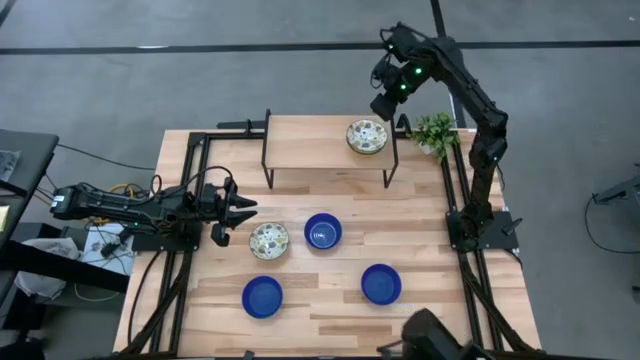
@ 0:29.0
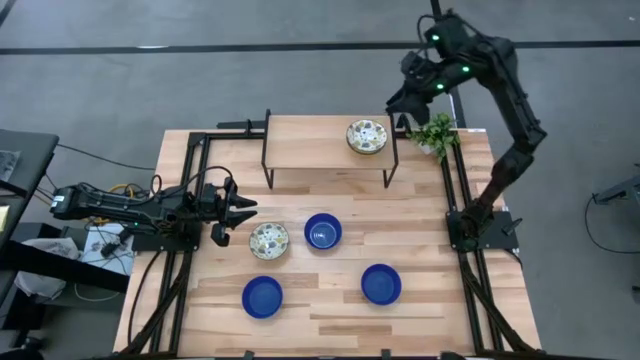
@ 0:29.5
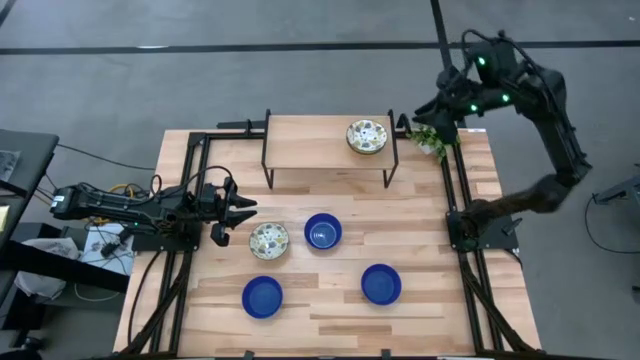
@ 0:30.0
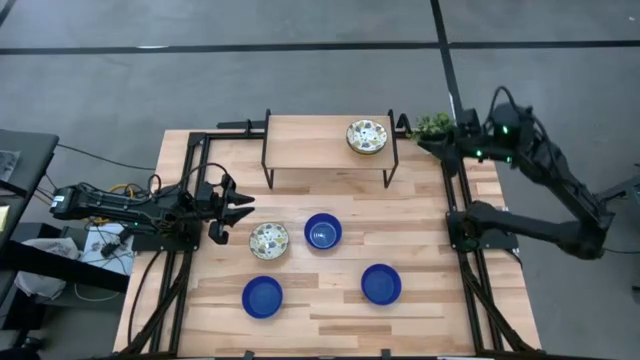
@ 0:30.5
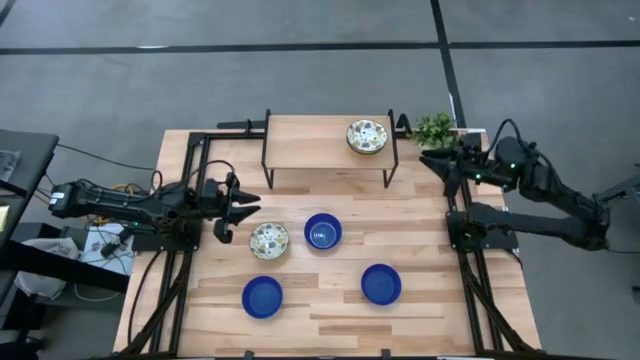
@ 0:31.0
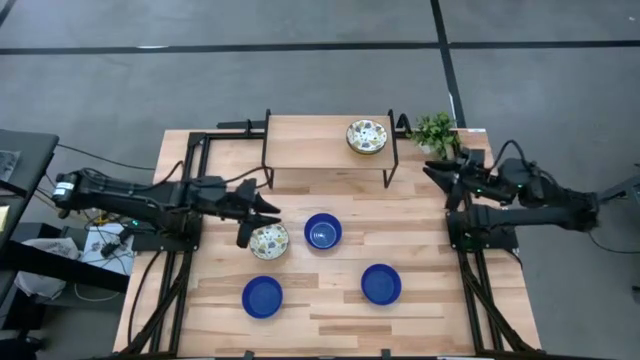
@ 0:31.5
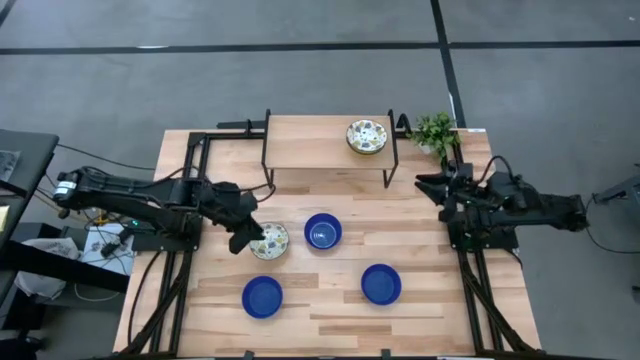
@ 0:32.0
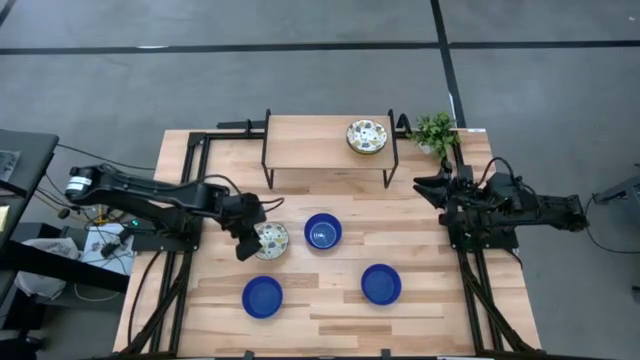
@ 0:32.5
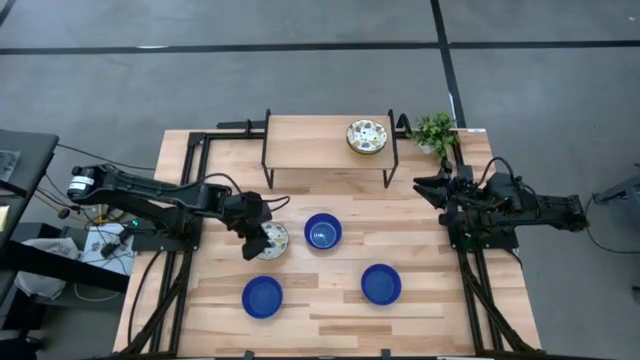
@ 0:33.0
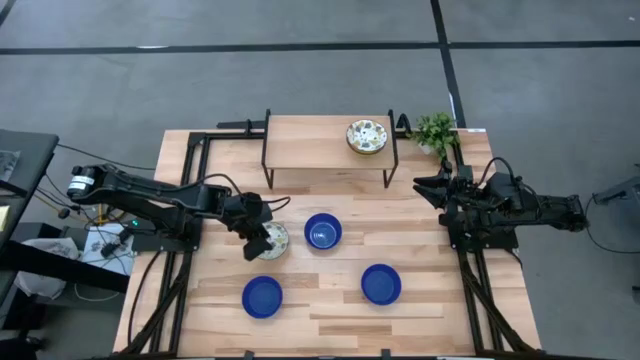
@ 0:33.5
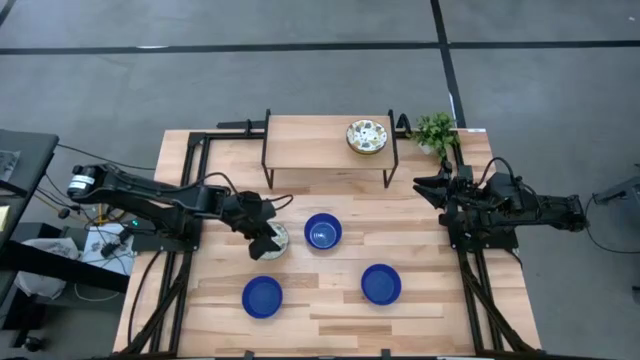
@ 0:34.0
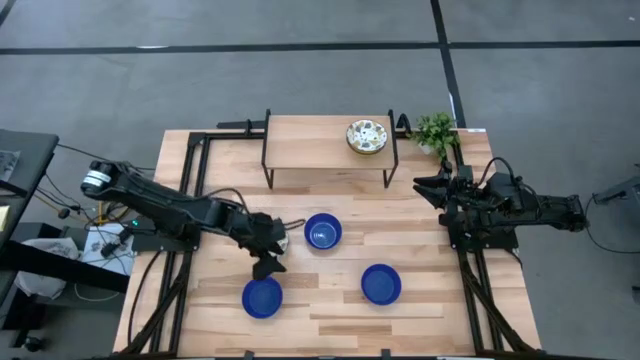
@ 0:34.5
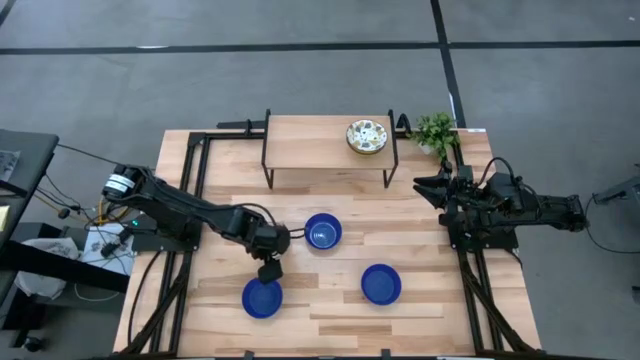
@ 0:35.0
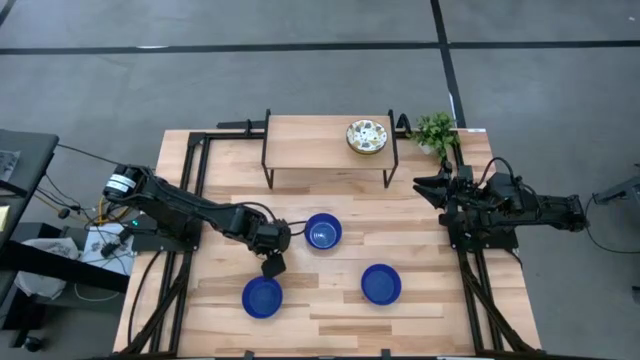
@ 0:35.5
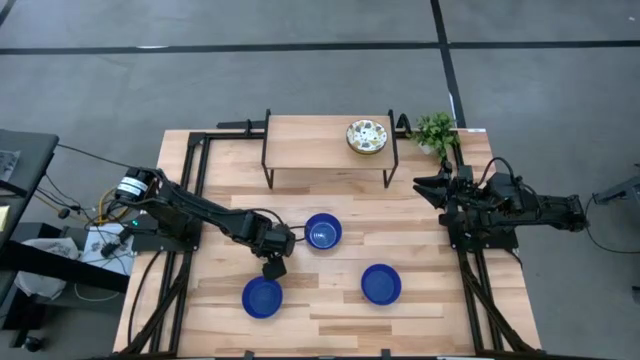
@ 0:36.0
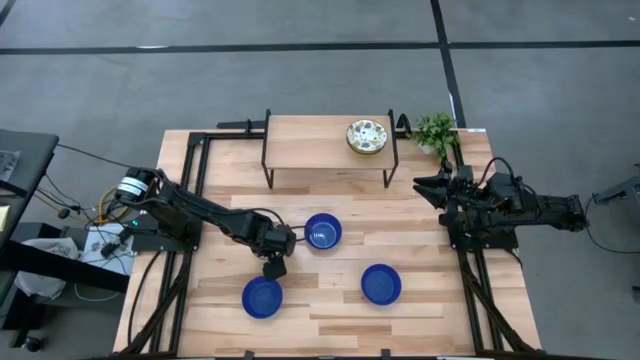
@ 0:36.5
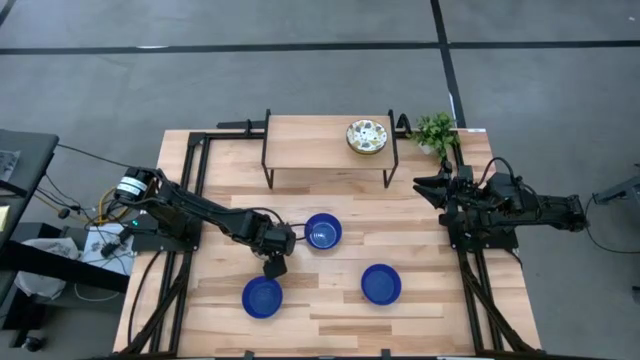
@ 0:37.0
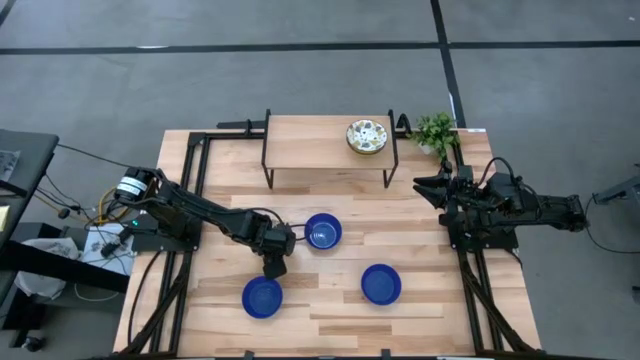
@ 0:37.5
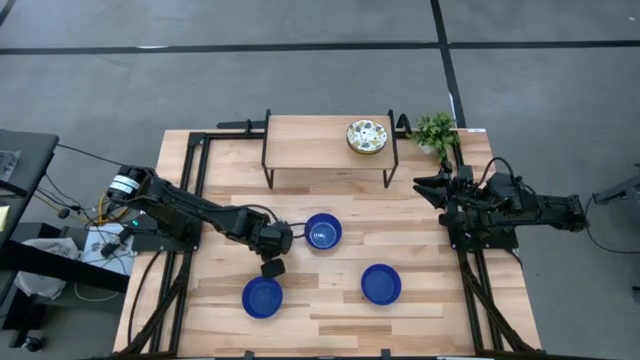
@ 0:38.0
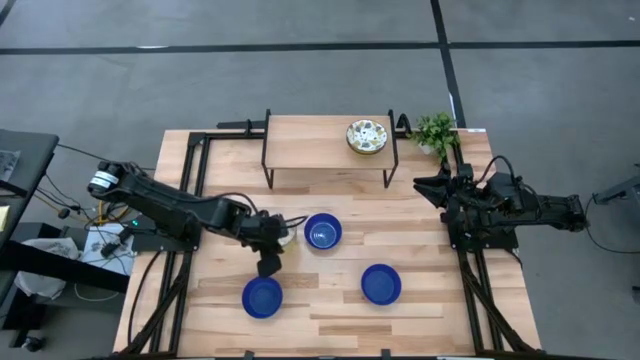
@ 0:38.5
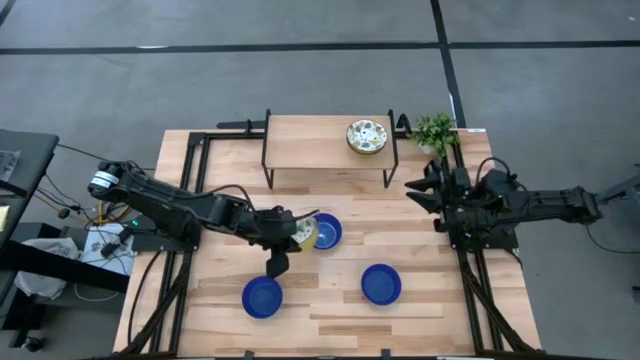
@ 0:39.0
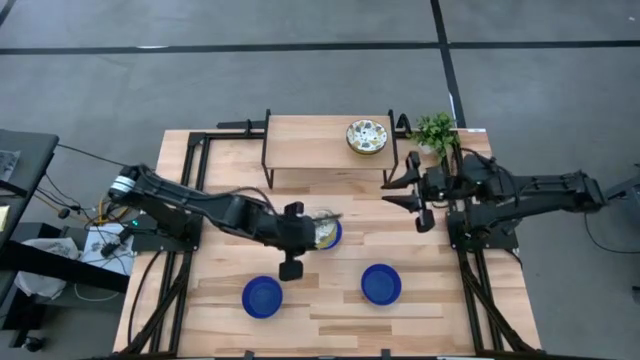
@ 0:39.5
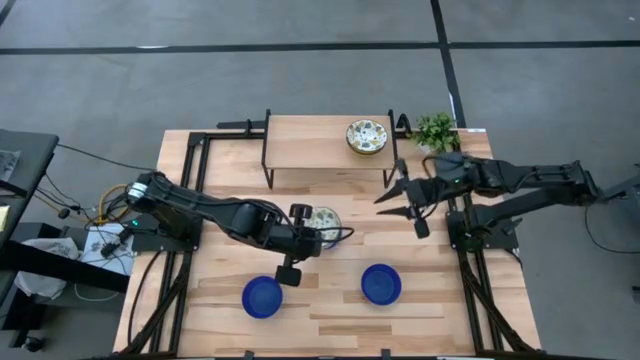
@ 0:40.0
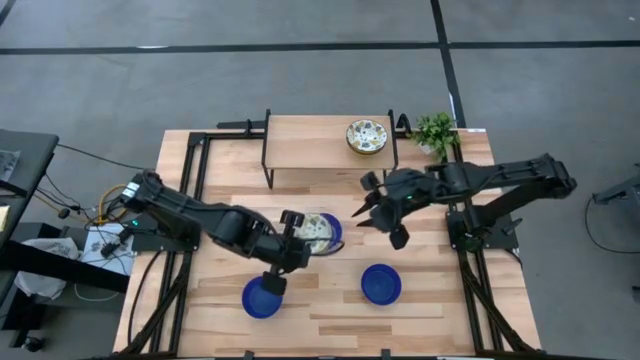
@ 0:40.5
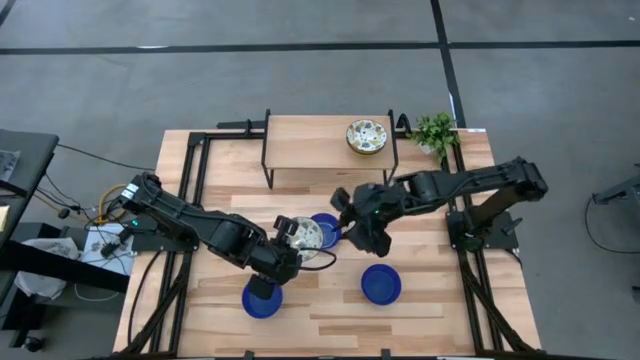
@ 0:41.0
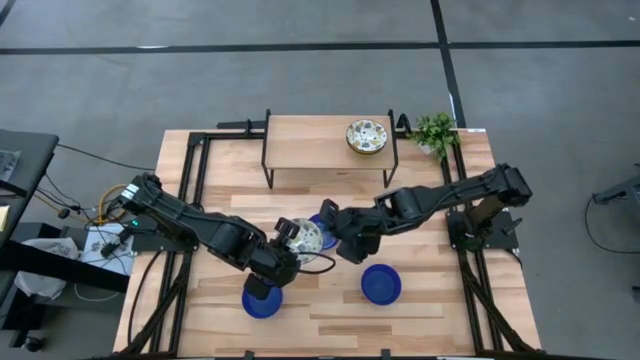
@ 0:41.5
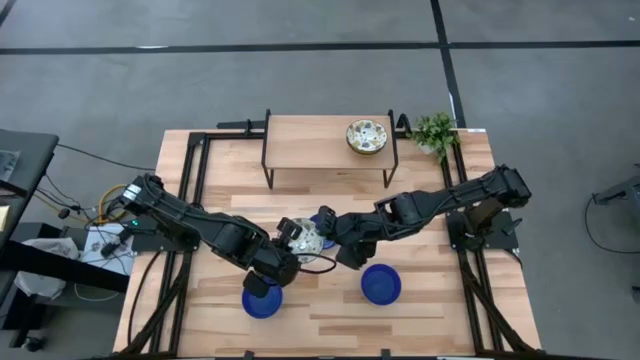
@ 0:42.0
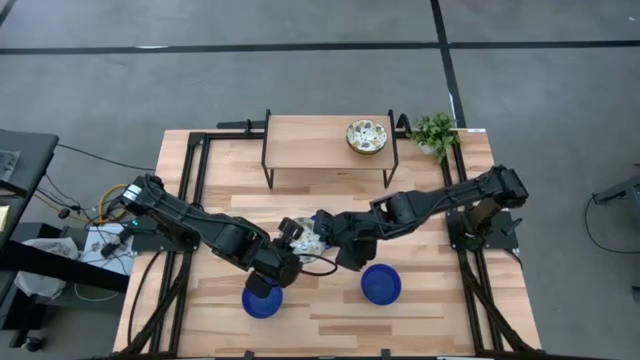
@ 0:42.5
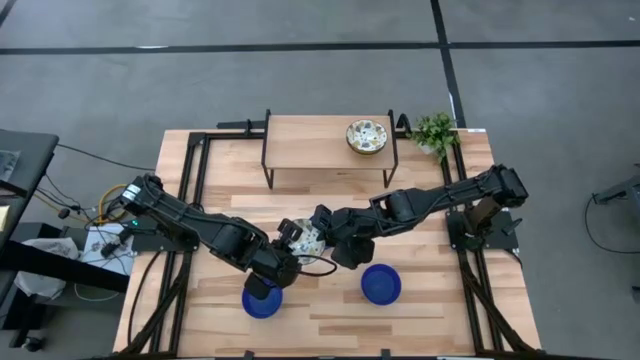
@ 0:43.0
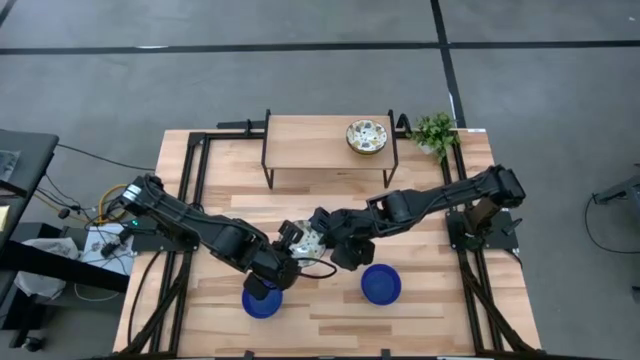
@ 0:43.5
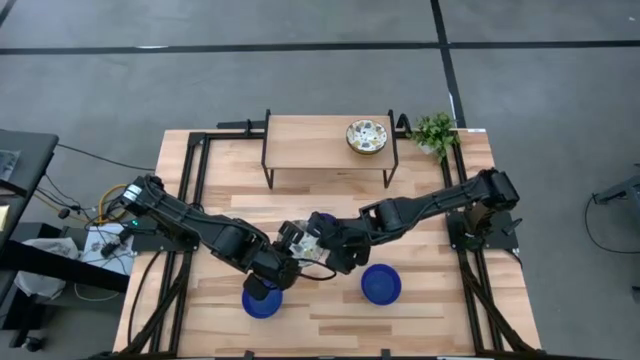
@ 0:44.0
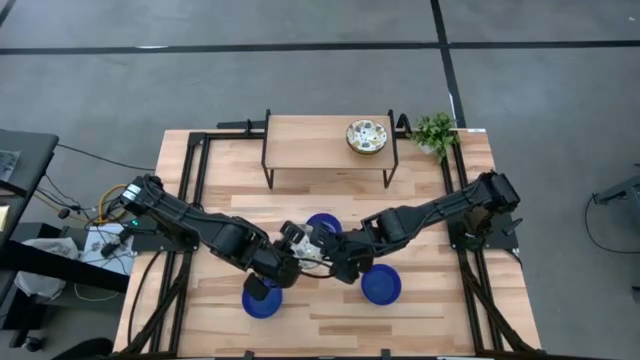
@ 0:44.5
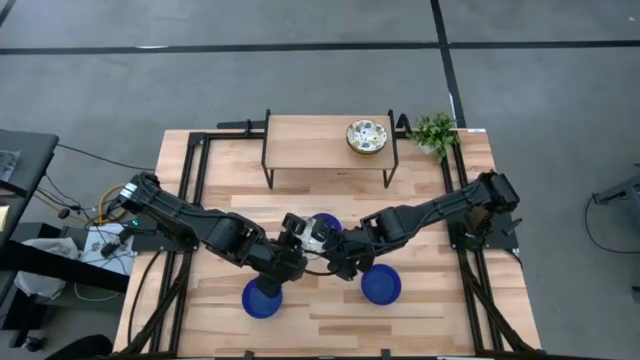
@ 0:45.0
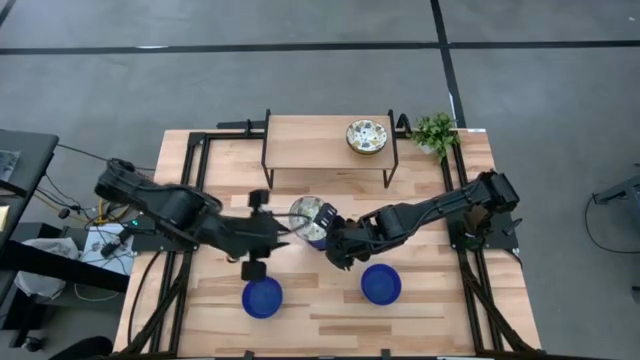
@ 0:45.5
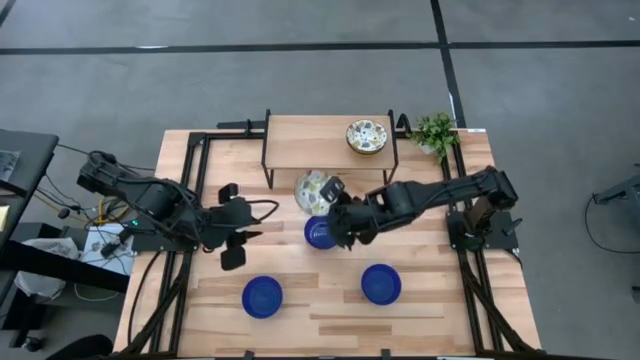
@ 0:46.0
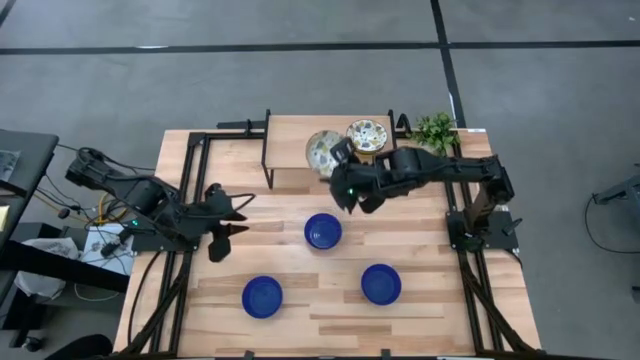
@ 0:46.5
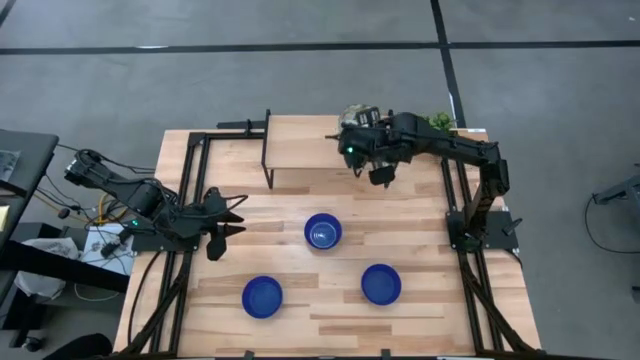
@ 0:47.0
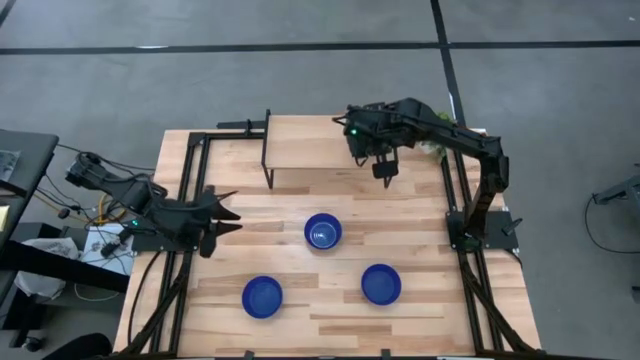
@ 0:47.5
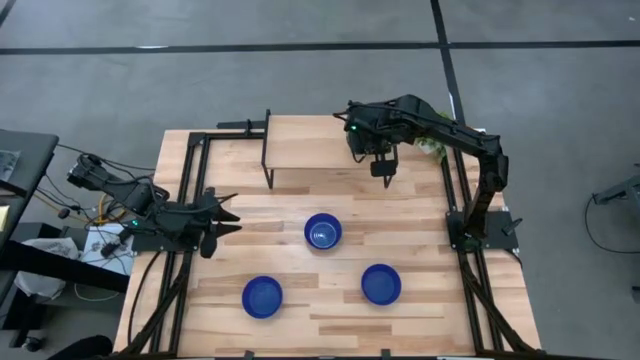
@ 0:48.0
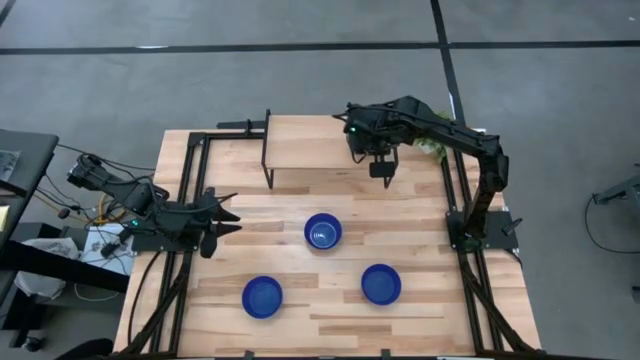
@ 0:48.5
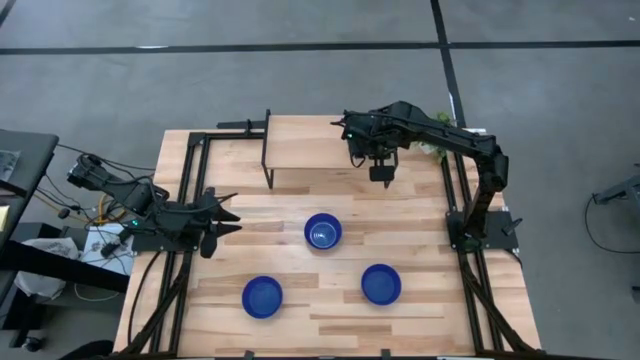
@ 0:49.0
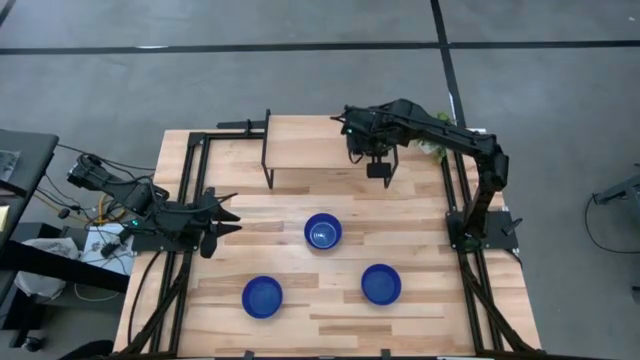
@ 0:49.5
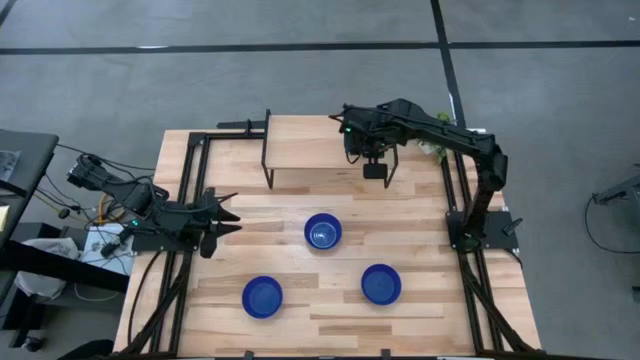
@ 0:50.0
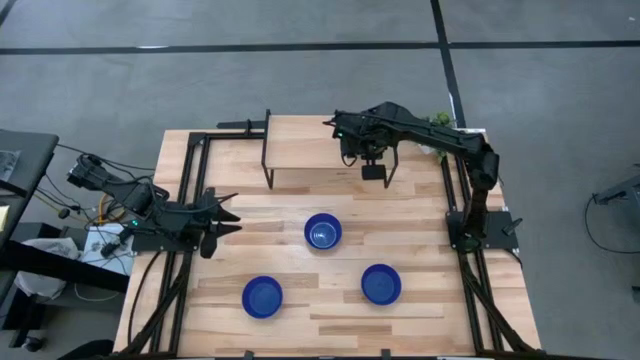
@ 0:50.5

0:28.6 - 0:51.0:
Task: Pick & Place Mini bowls
Stack the yellow patterned bowl on top of the stacked yellow patterned bowl on the shelf
